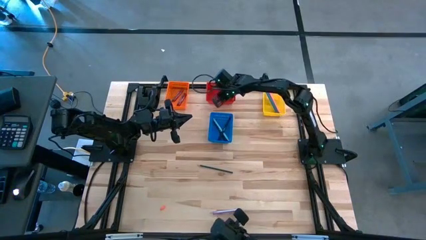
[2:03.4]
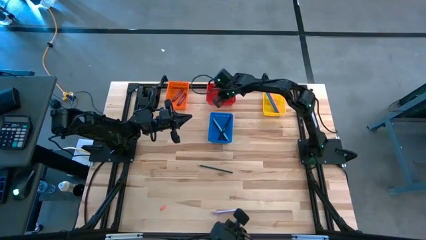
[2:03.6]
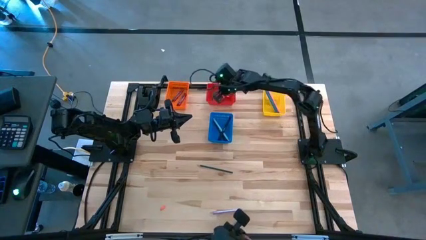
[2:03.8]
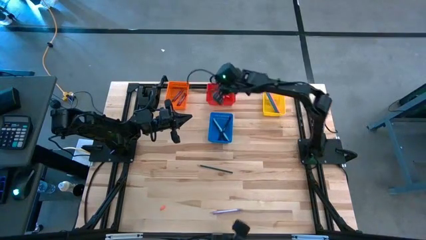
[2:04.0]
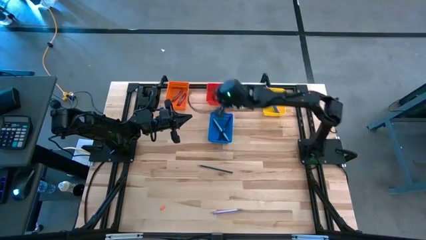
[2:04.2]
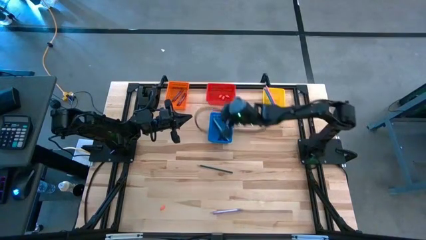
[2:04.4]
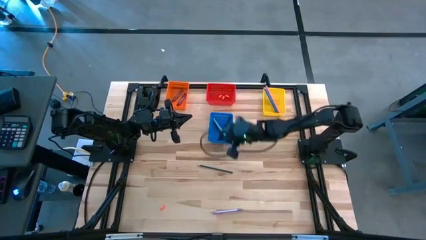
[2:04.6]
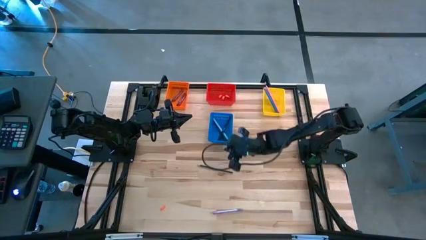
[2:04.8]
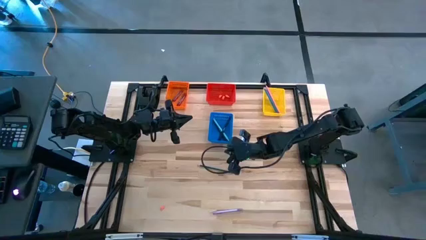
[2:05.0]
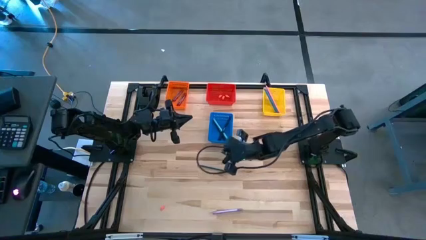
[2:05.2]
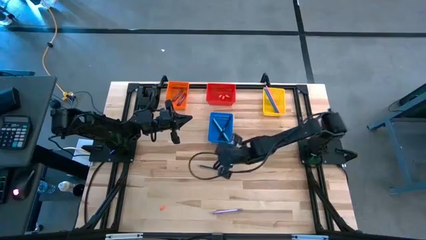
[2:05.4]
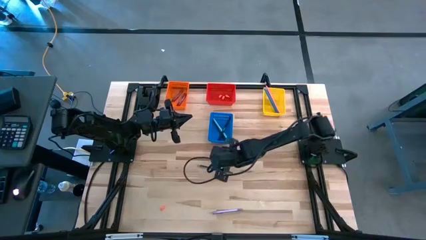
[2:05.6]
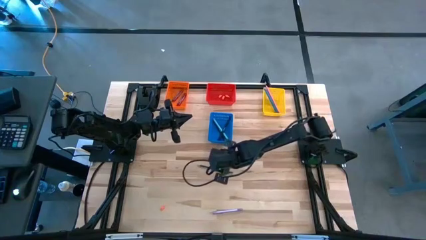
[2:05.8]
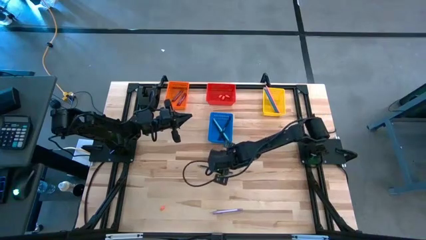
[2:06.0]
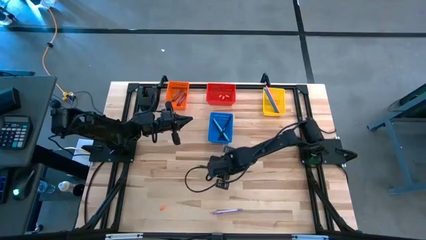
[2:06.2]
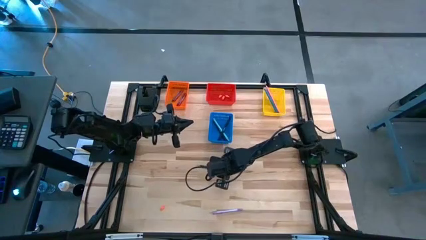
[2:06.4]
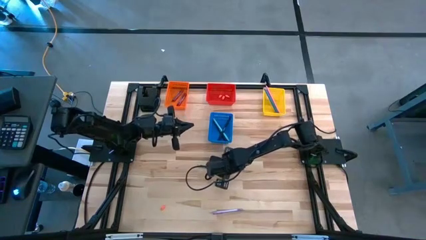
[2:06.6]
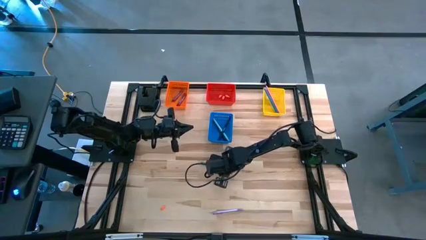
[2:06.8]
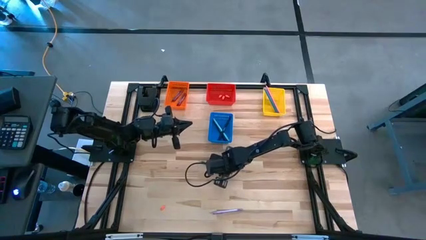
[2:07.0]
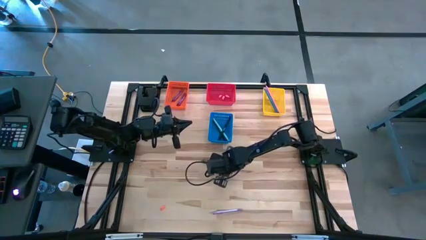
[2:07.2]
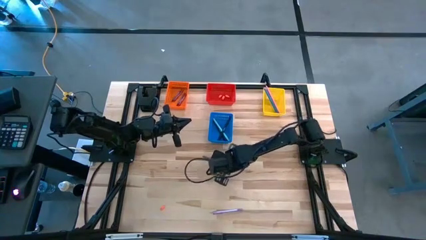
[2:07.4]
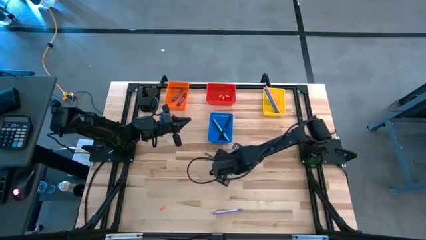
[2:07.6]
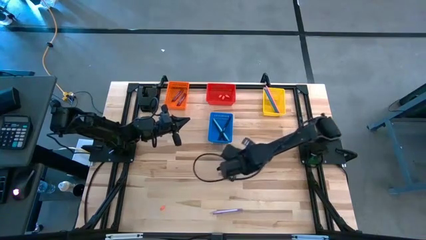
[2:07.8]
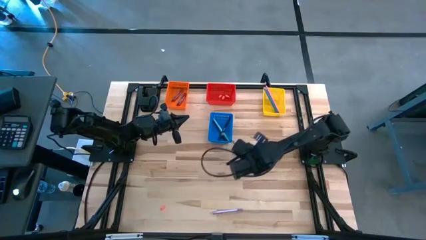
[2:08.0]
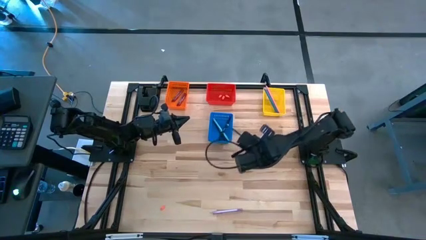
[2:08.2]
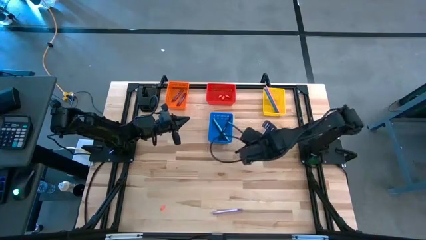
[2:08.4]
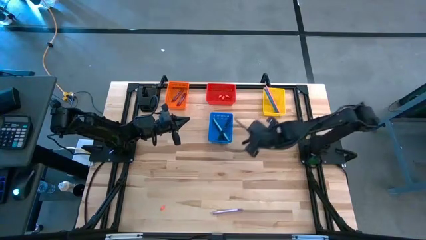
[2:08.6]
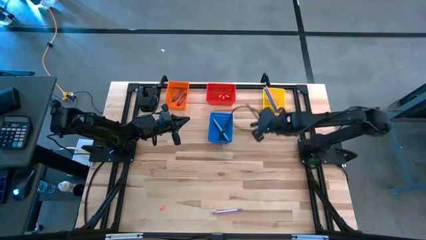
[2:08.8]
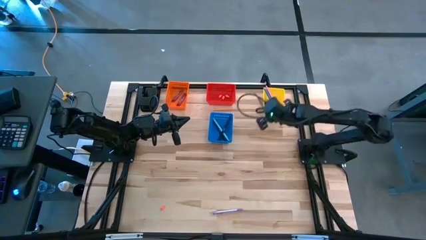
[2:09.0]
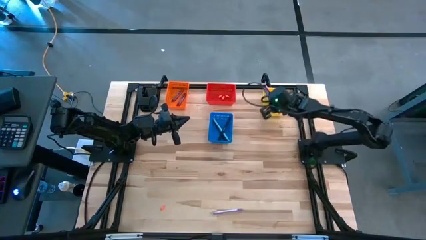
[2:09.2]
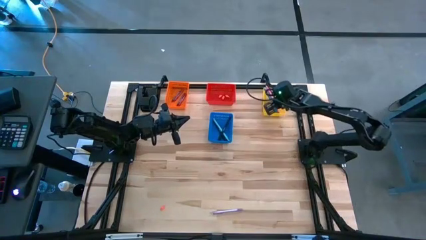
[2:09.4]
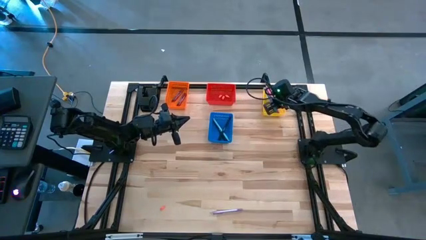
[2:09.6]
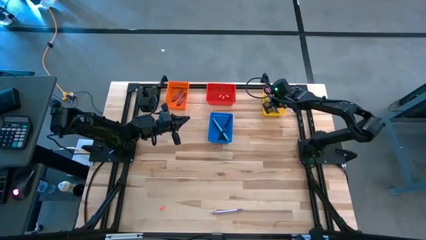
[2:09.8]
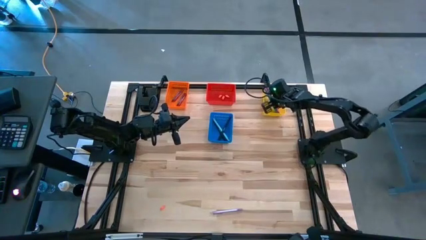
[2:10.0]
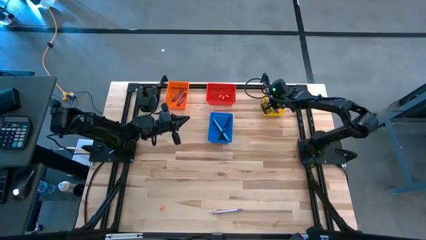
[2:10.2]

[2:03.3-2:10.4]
Task: Sort crayons/erasers/pens/pencils in bins
Put the green pencil into the yellow bin

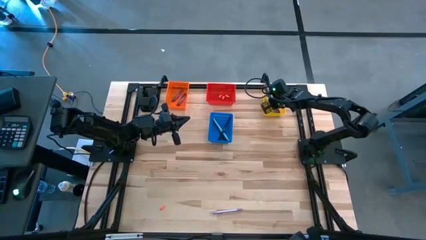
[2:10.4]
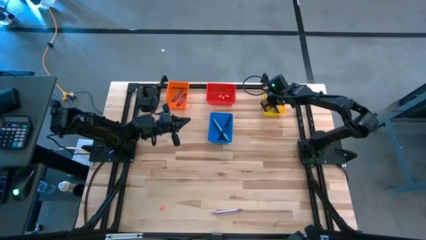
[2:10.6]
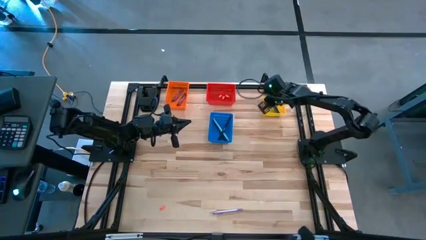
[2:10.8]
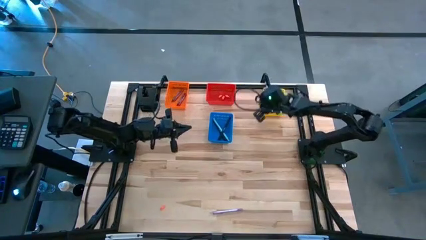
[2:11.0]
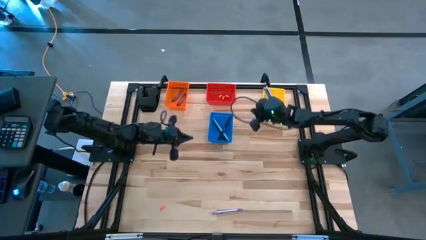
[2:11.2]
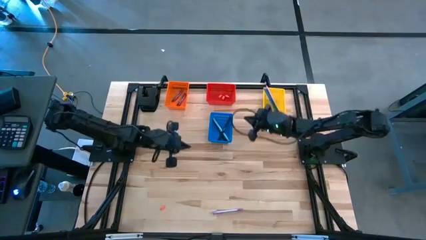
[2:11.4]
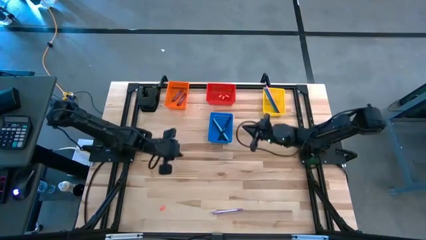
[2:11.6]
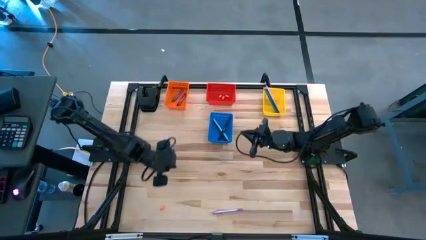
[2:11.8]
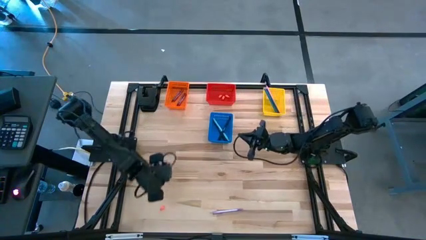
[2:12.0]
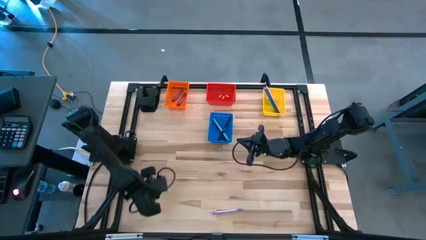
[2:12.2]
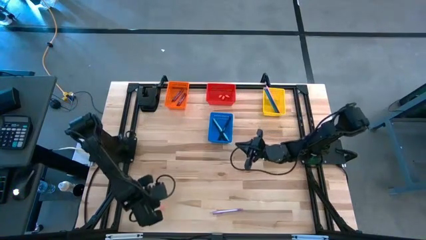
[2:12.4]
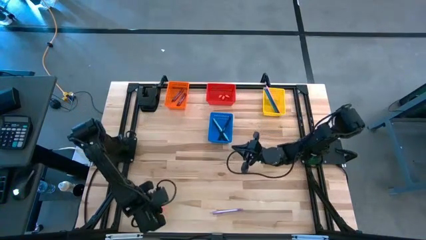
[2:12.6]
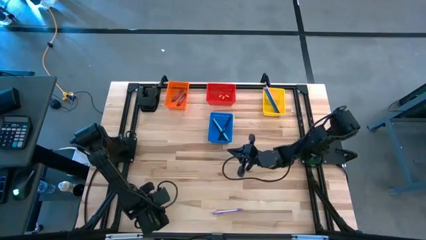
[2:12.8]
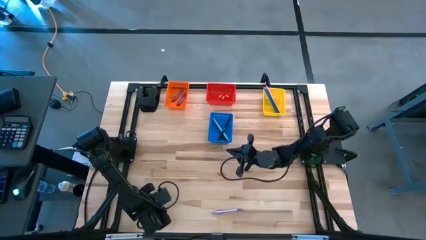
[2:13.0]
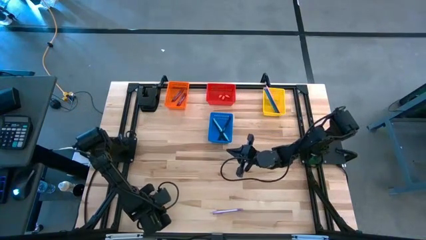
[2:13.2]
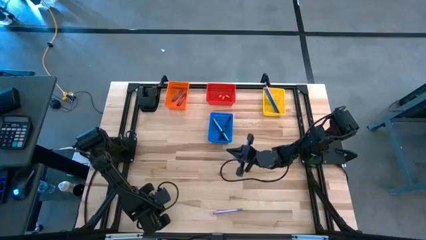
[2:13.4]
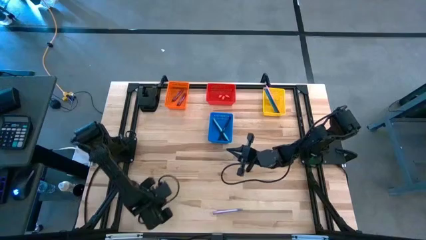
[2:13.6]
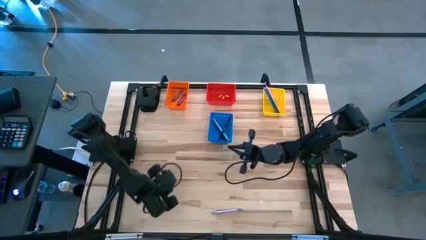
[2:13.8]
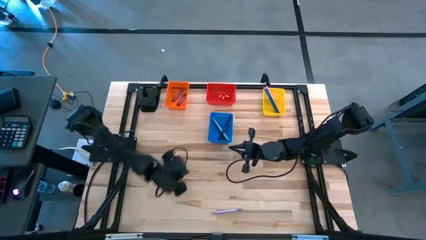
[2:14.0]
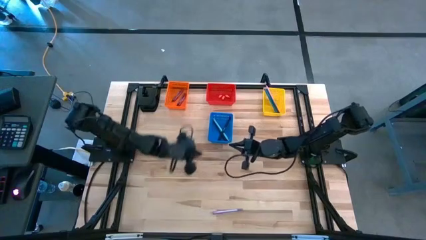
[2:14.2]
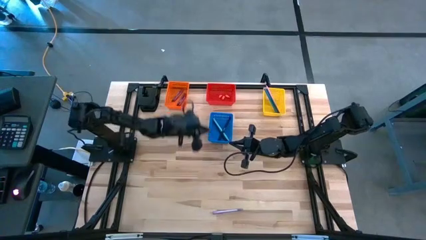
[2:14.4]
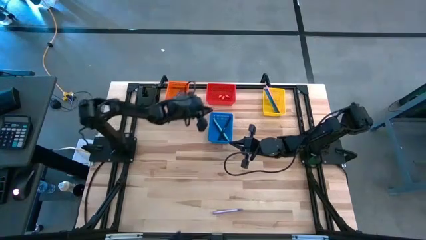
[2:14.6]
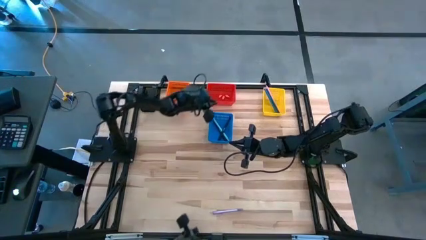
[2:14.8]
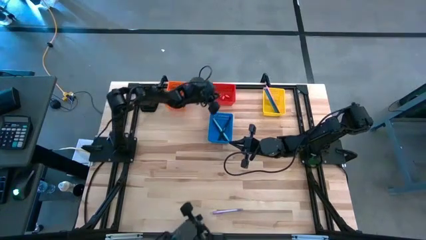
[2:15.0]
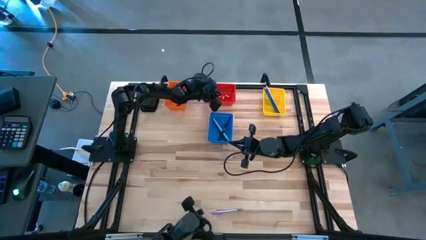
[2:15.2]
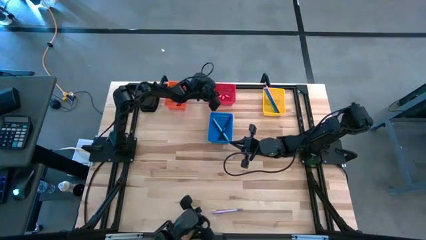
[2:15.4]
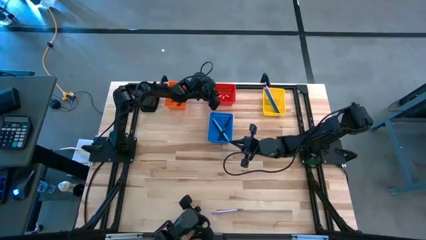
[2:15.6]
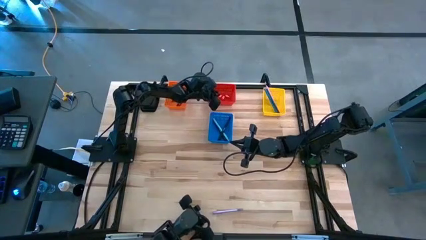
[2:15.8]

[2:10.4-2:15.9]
Put the orange eraser into the red bin

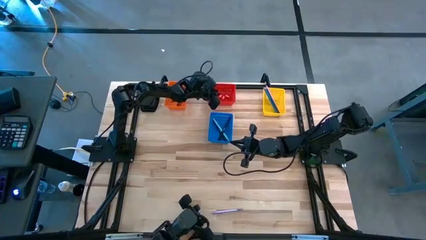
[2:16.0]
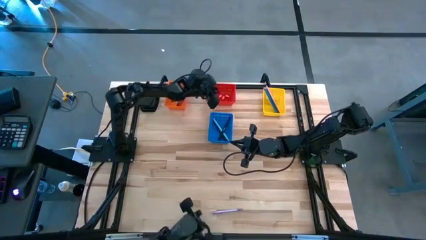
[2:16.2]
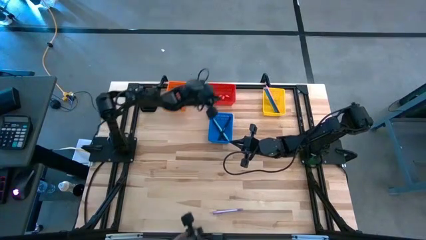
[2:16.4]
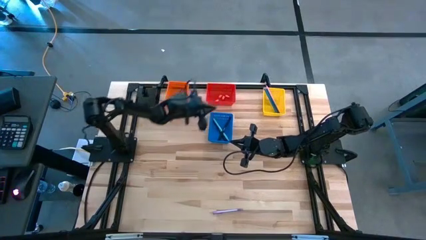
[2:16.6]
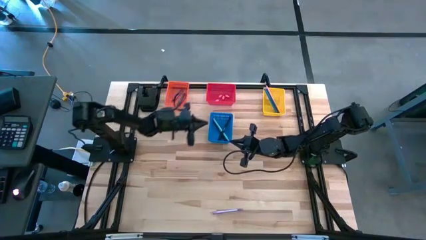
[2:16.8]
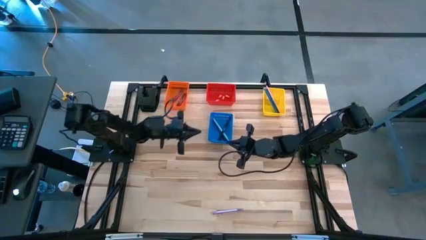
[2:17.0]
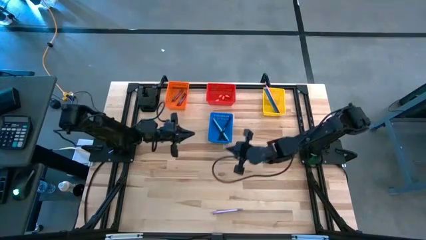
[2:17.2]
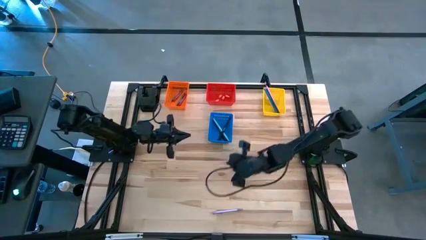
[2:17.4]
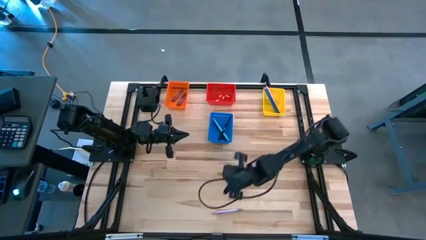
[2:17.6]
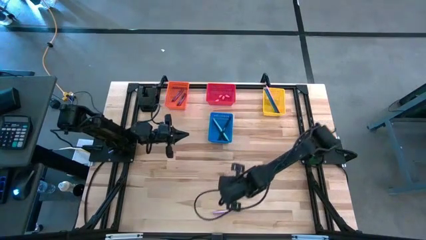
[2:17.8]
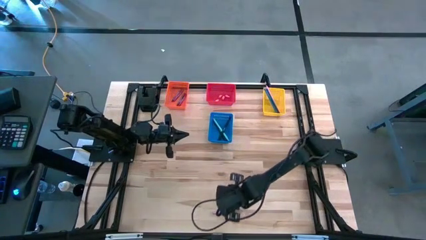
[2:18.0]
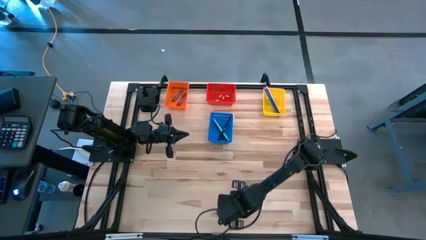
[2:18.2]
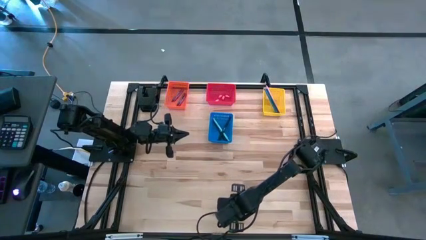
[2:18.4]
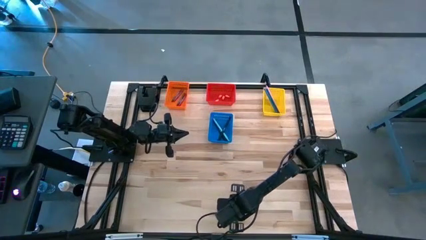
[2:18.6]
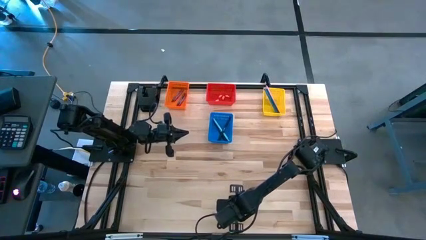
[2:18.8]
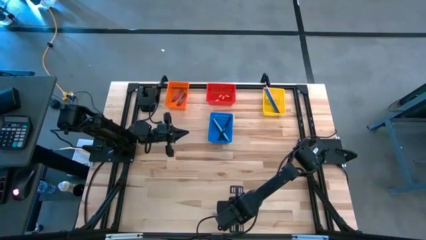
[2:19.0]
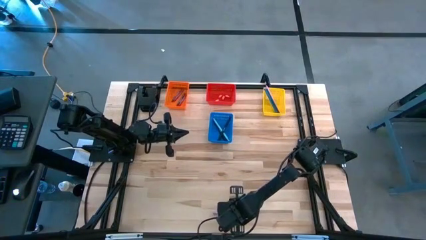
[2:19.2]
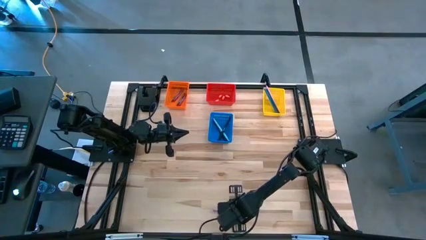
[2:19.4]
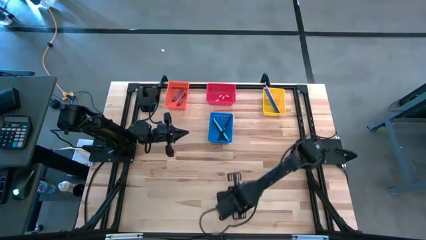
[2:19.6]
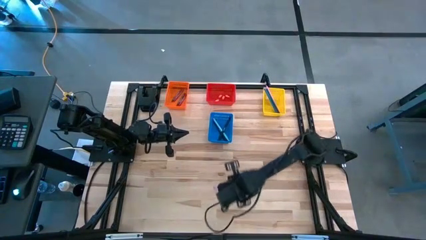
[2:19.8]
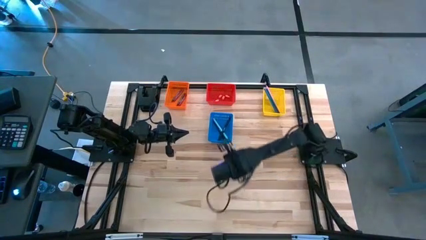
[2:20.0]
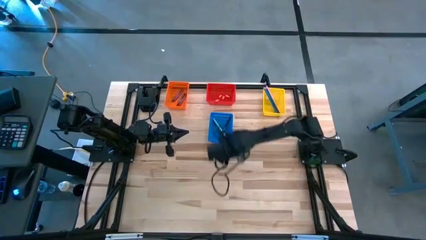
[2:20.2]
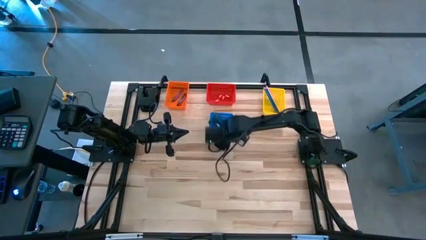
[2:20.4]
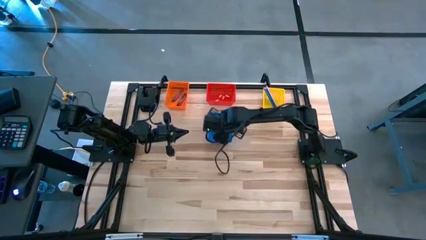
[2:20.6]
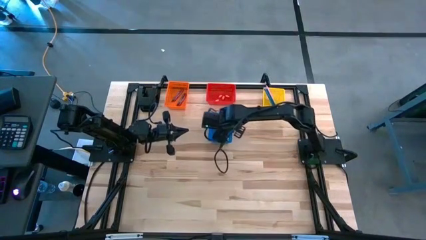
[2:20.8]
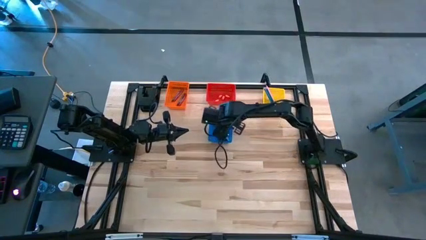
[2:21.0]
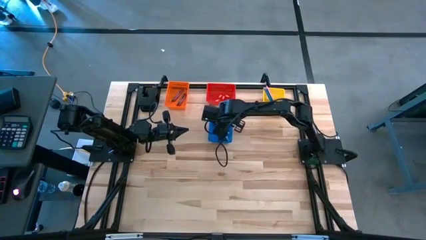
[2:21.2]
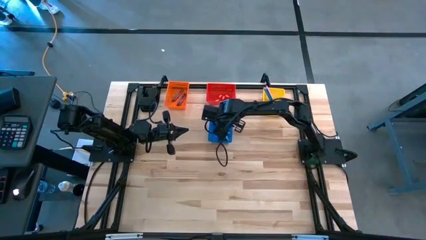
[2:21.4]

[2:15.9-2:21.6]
Put the violet pen into the blue bin
